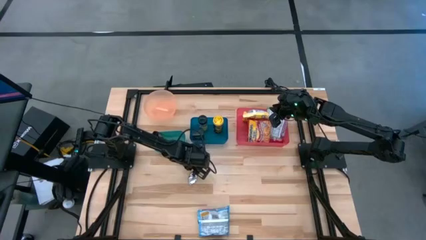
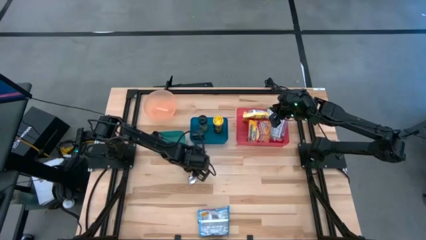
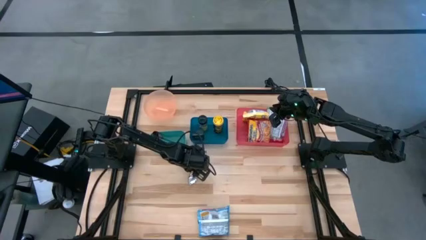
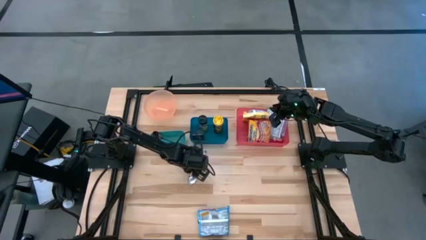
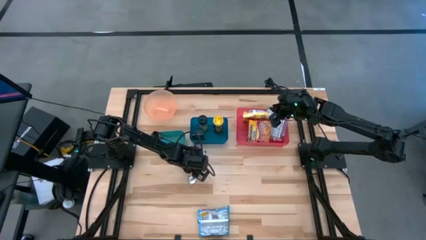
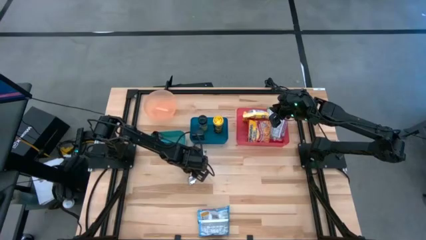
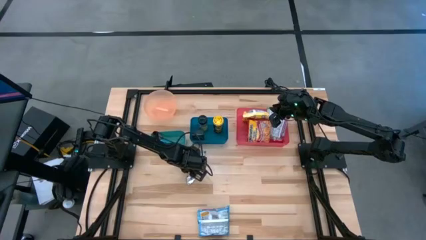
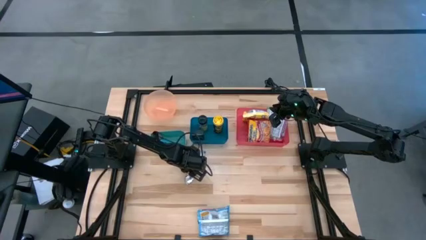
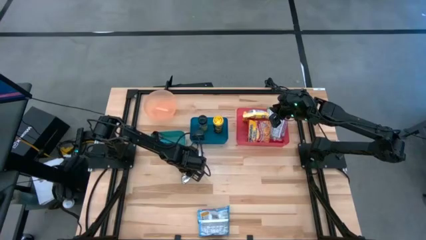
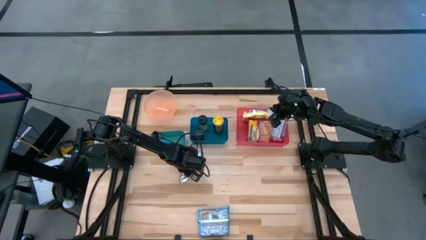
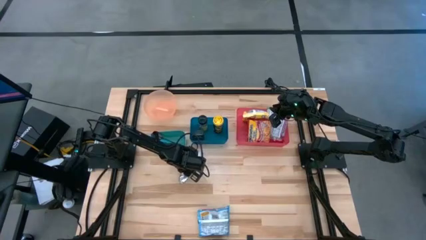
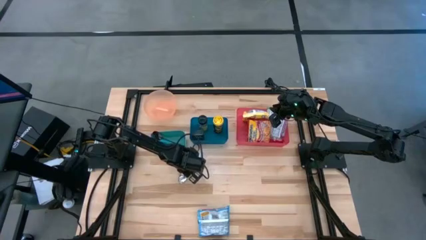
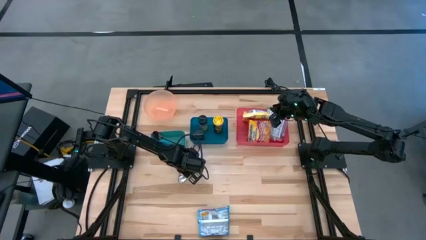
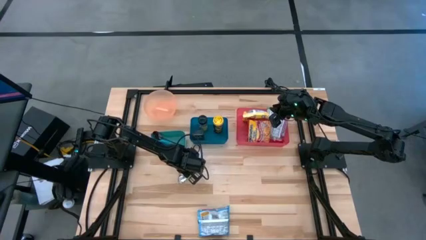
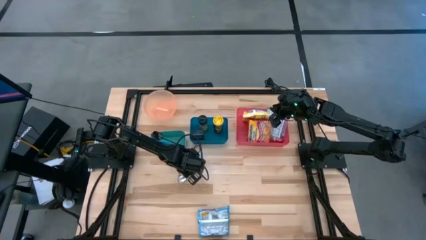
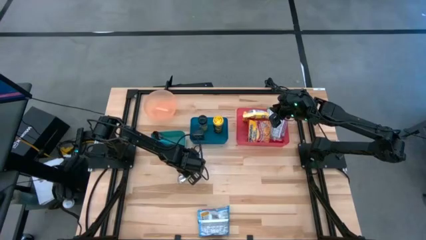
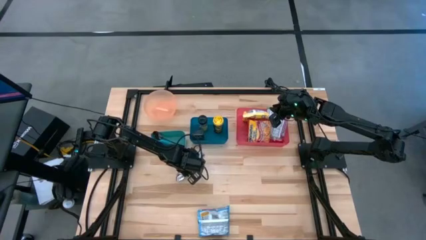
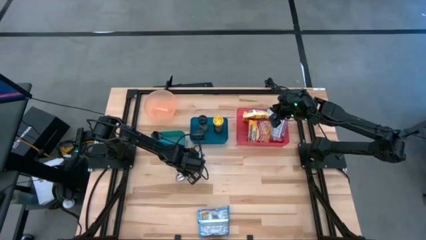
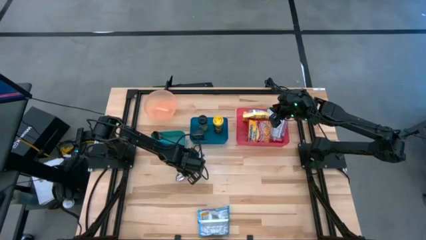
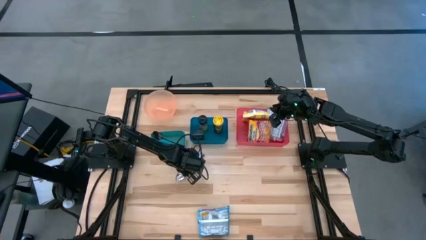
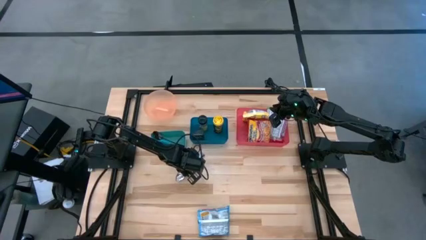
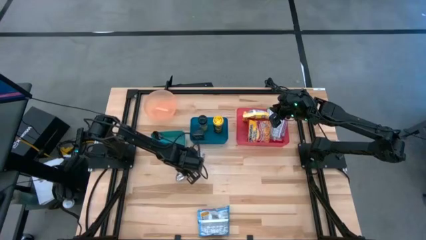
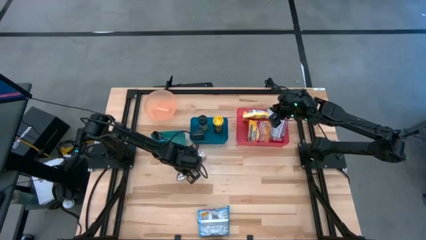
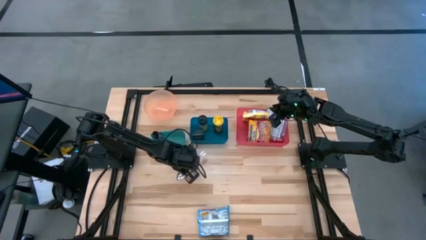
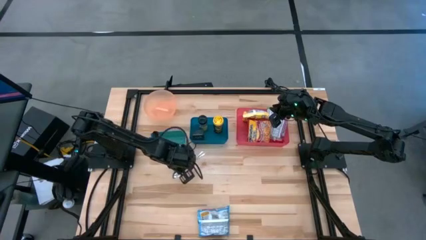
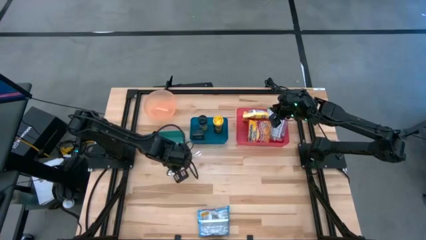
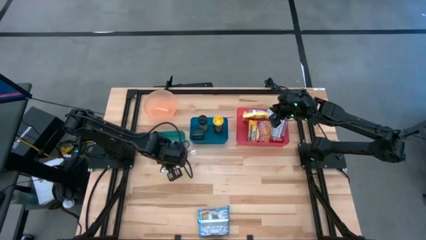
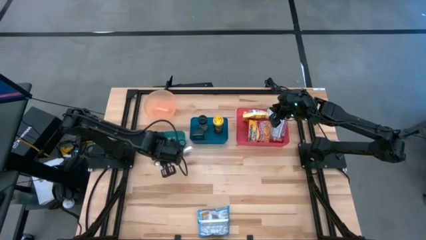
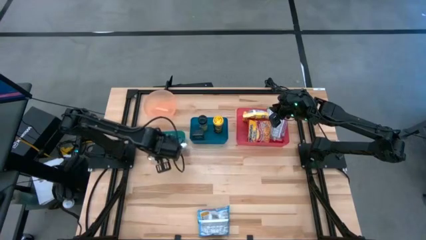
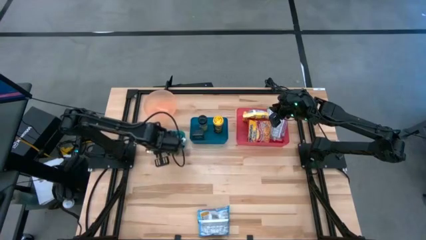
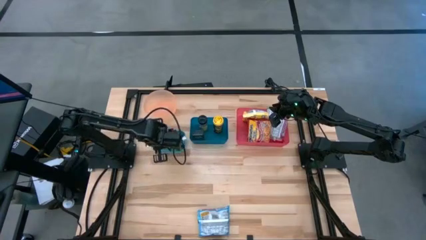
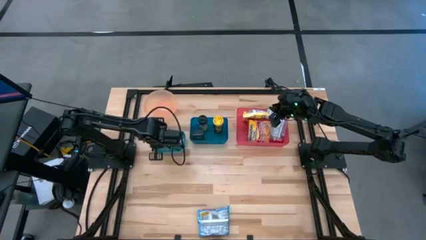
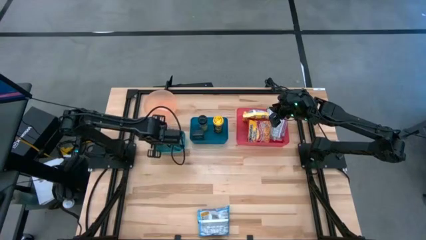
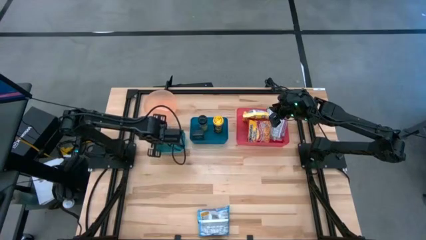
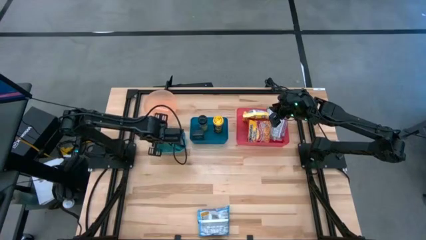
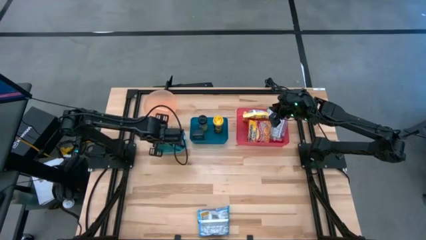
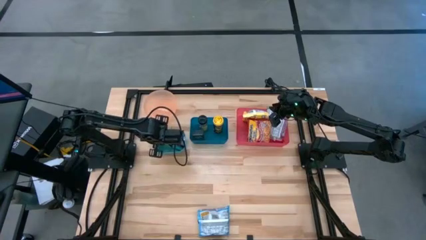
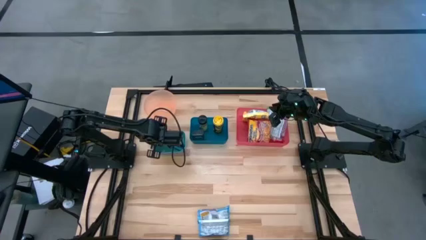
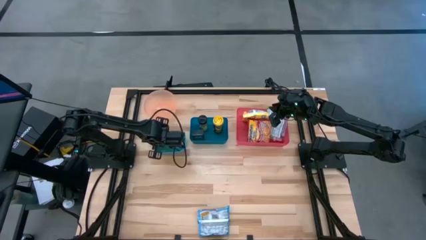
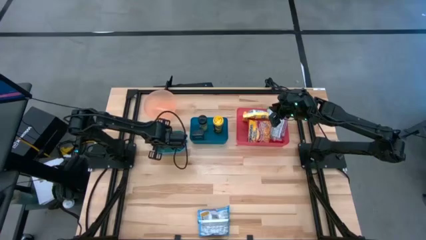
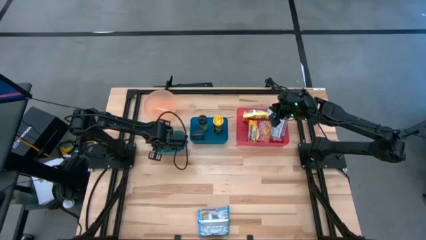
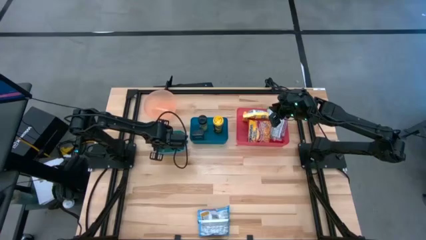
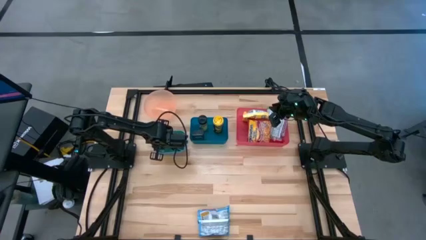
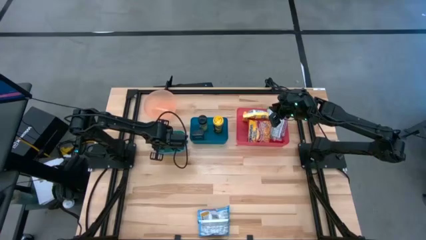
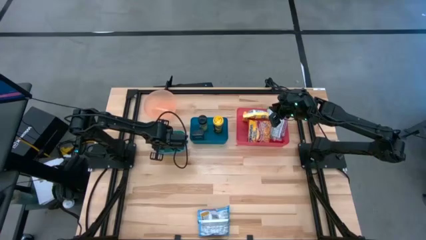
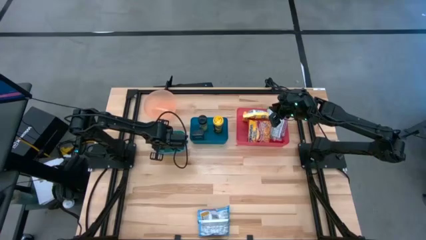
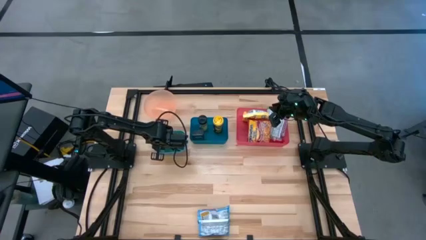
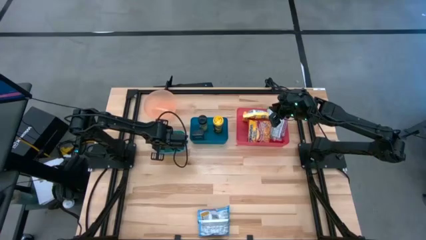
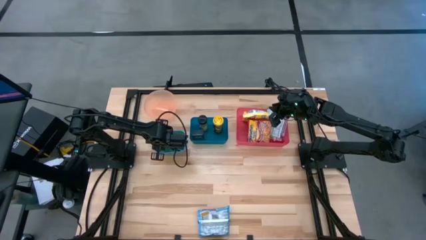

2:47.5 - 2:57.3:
Task: Pick & Place Food Item
Put the silver spoon into the green bin

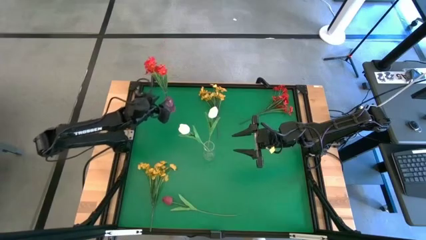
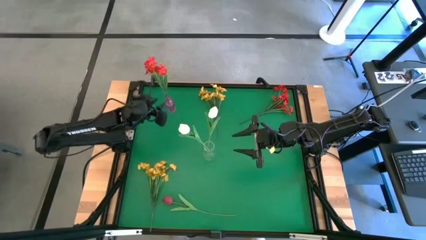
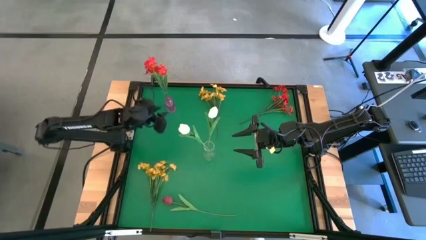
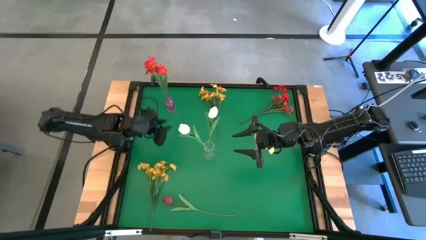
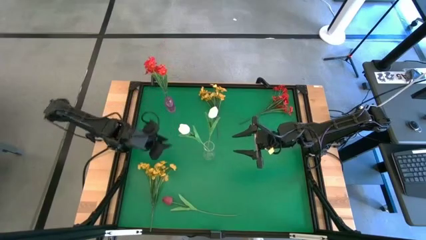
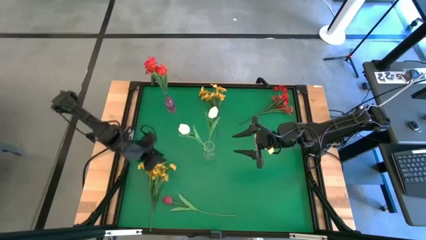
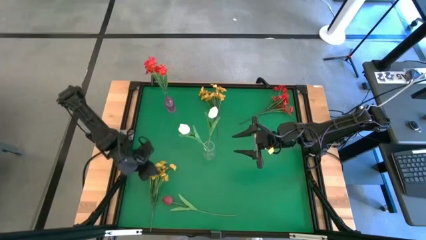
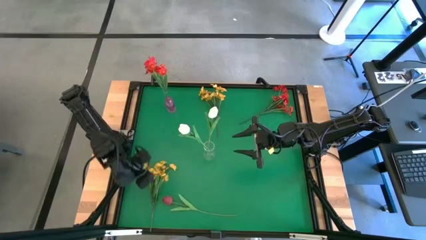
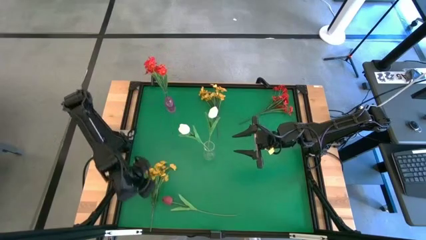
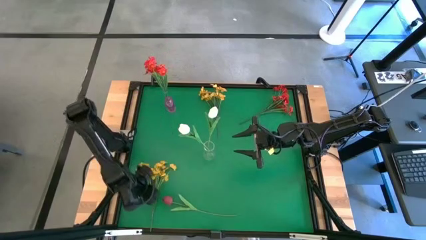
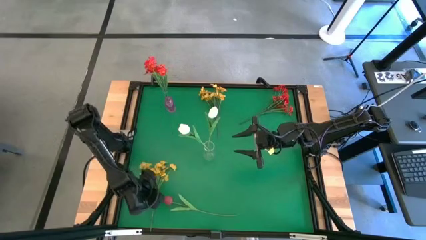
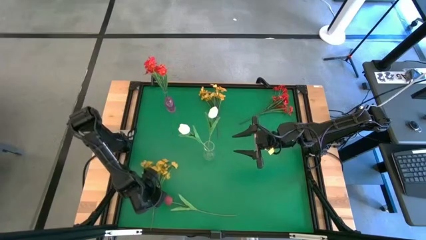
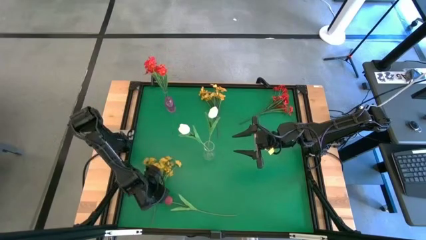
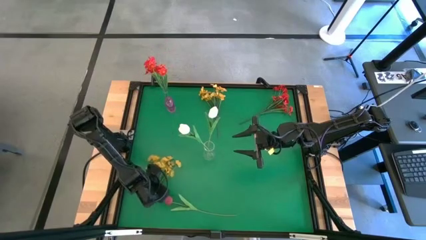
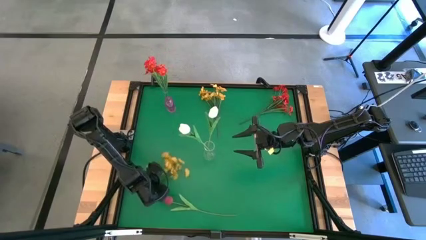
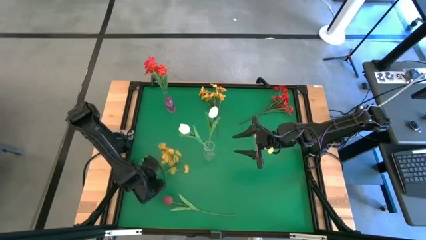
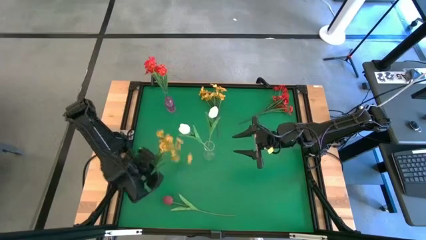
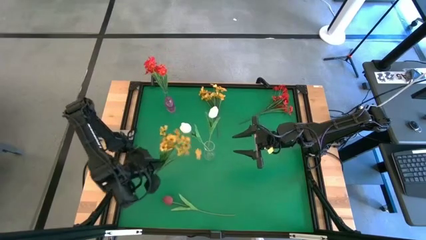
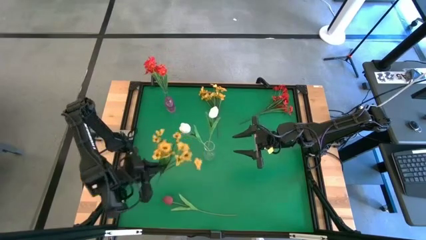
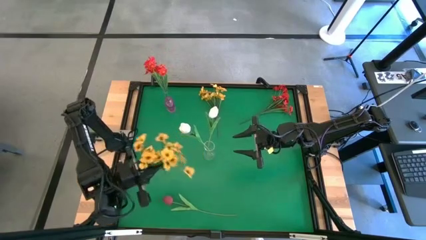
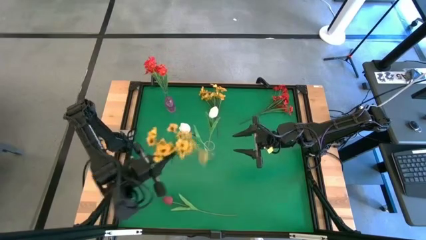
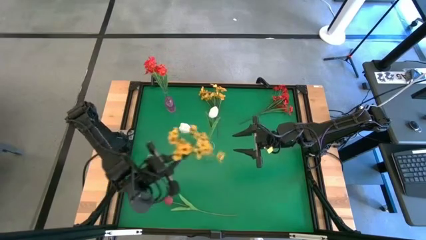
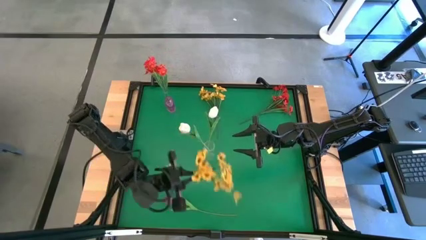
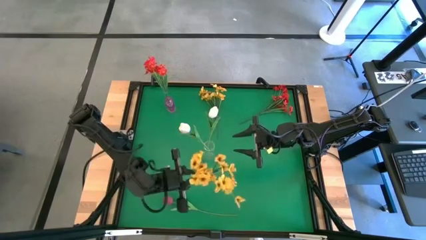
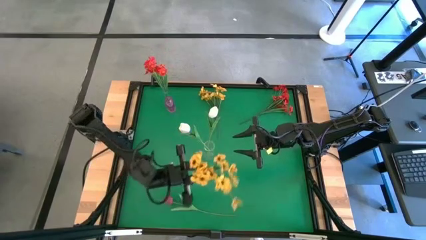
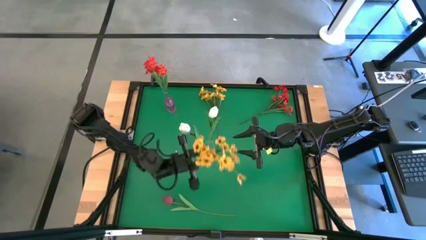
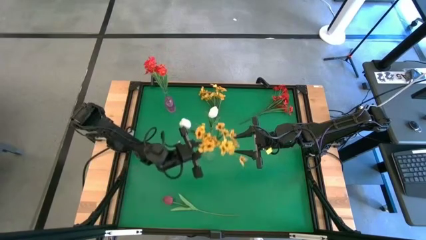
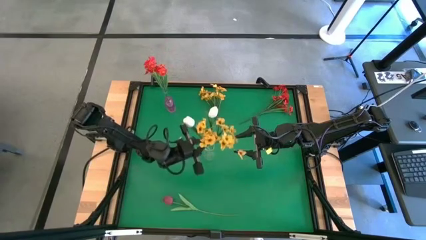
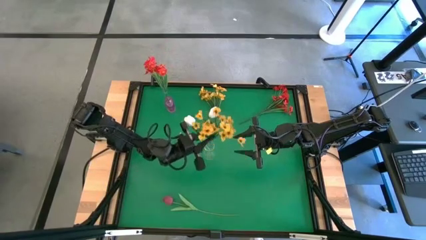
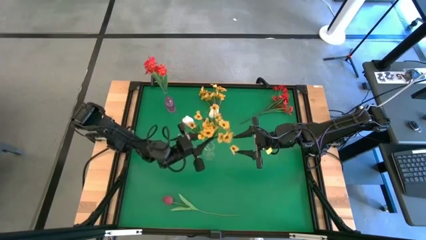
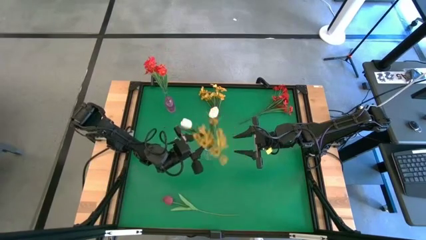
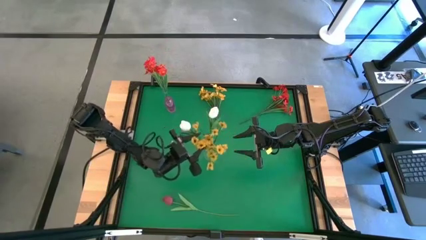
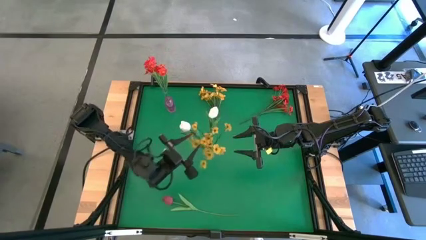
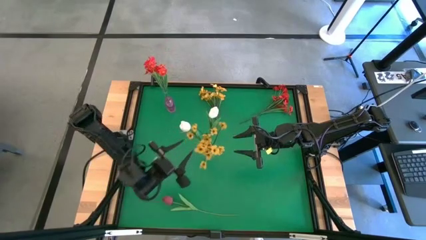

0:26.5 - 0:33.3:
Task: Sort flowers into vase by color
Put the bottom yellow flowers into the transparent vase
